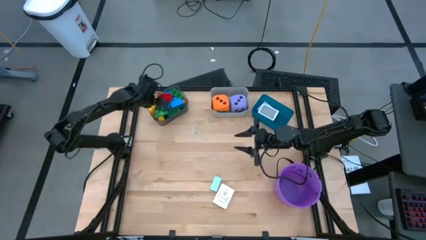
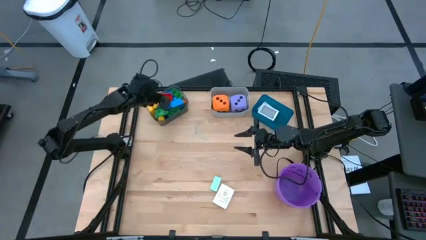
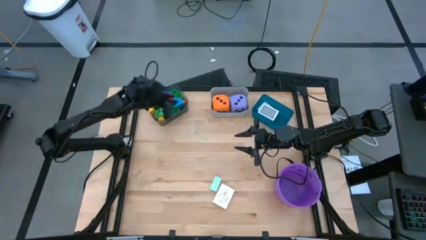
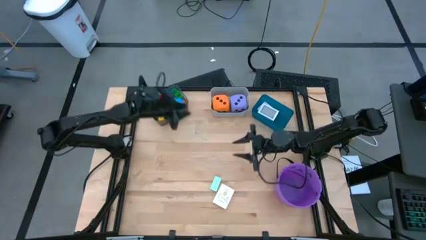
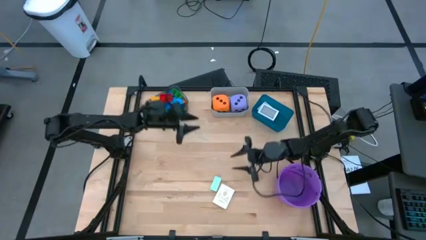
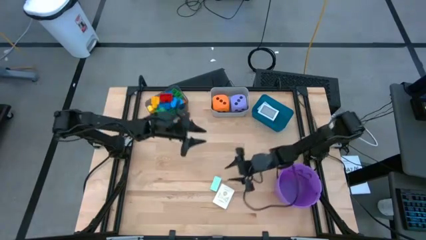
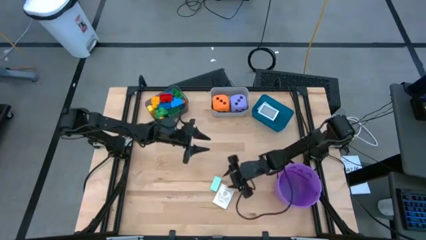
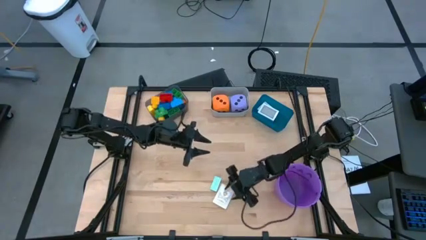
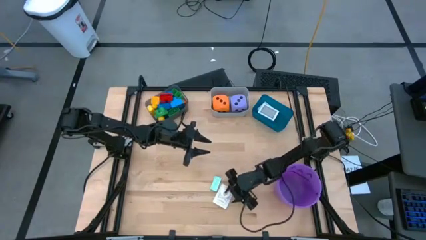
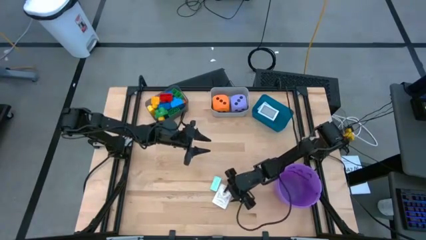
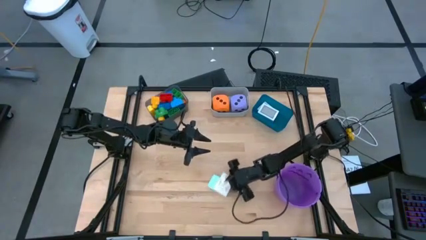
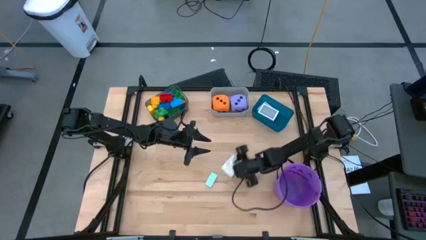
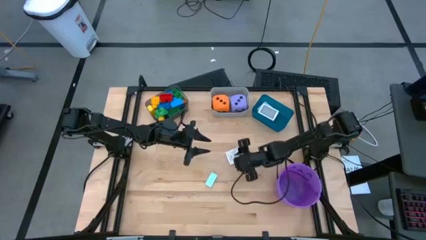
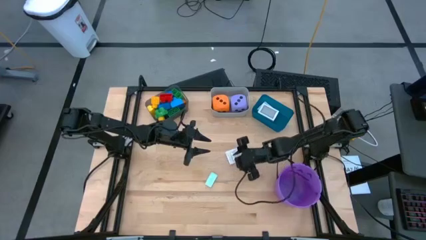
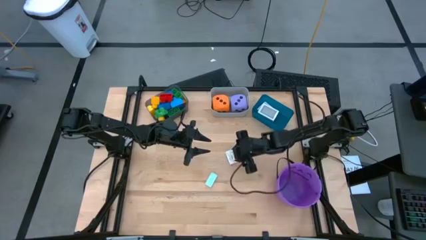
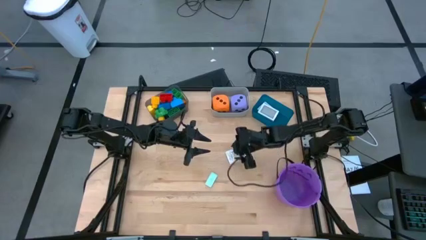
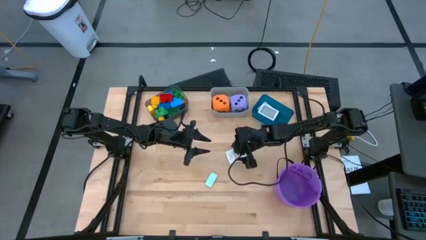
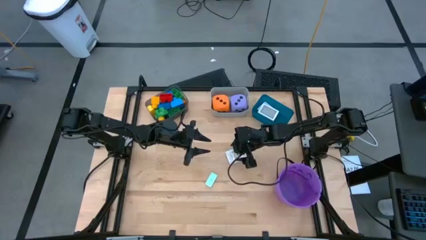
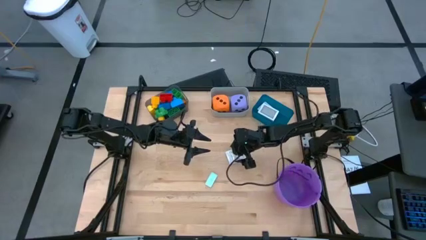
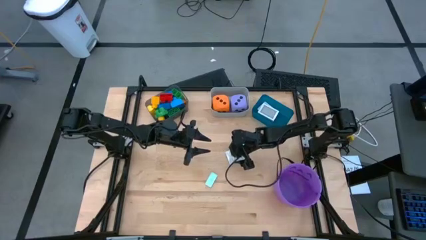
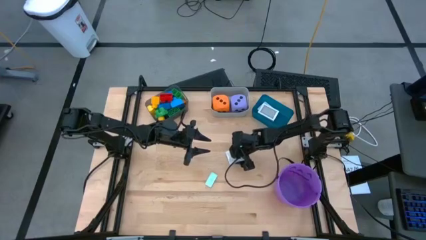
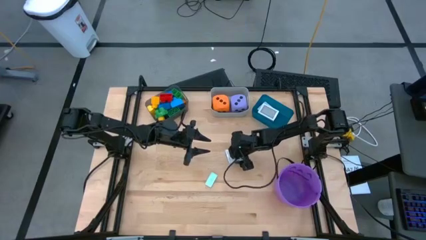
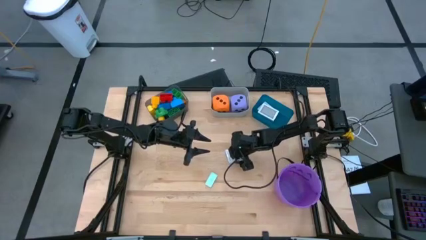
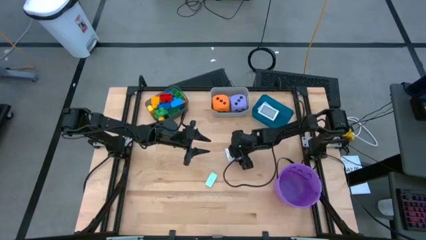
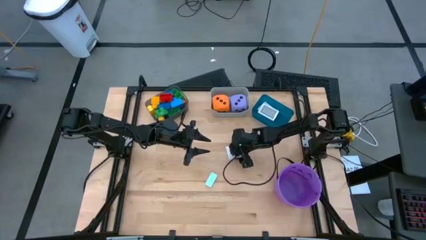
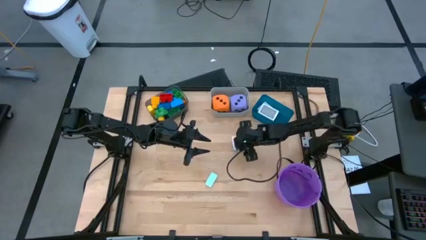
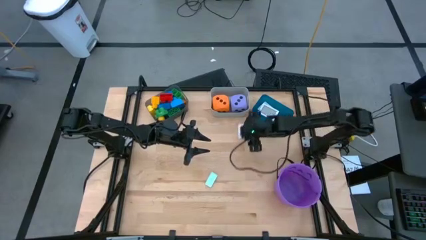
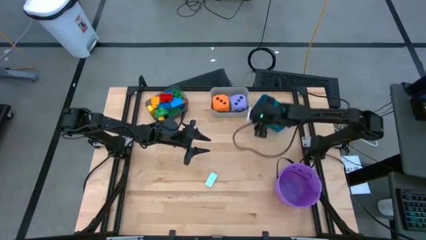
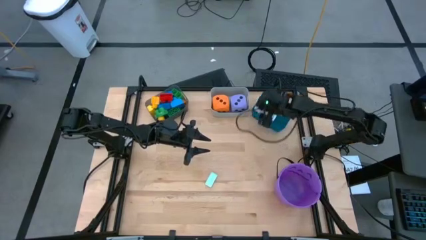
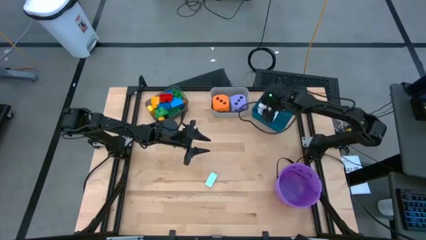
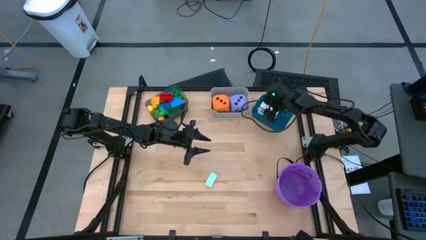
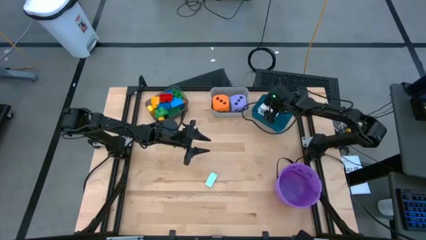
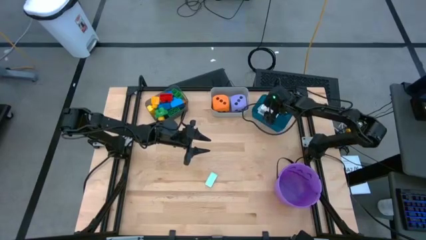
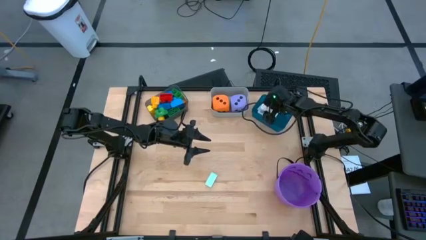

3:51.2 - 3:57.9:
Task: Pick & Place Toys
Put the yellow deck of cards into the blue bin

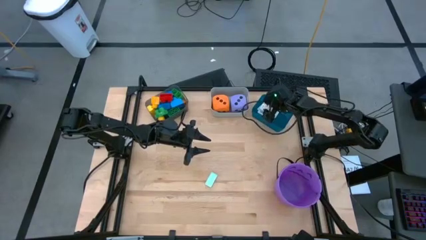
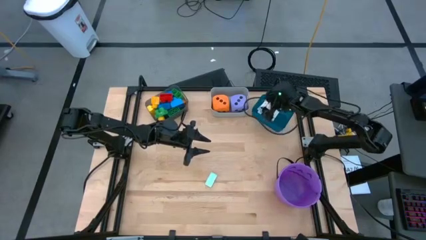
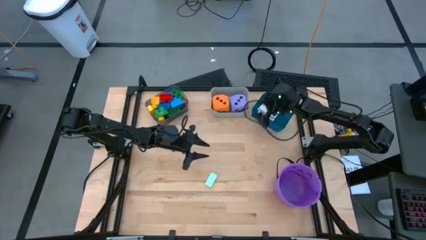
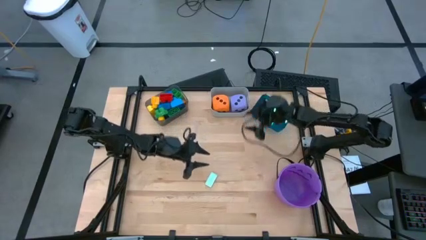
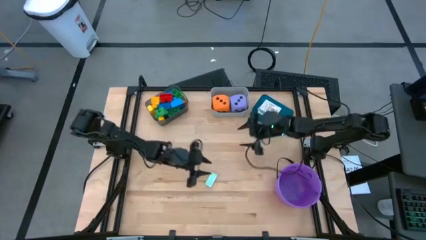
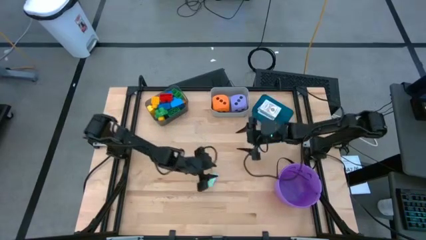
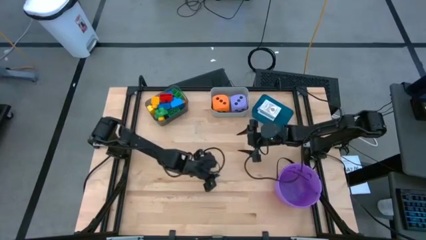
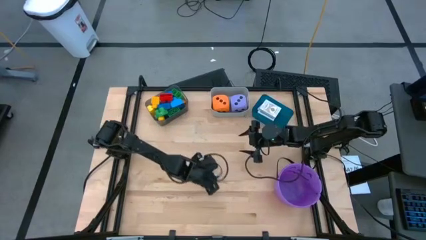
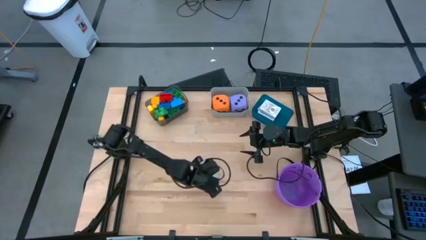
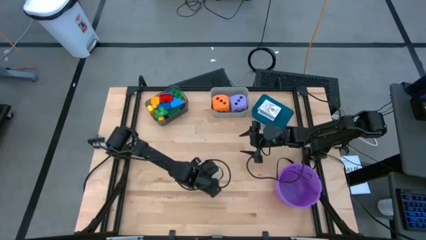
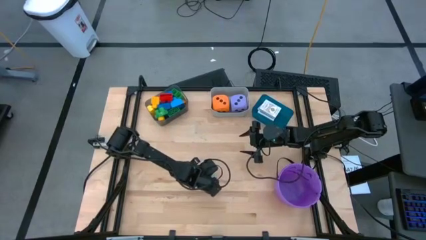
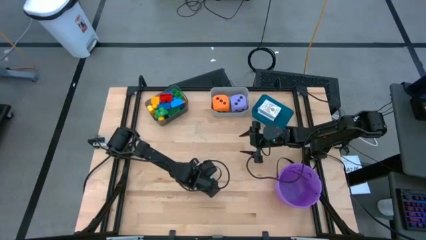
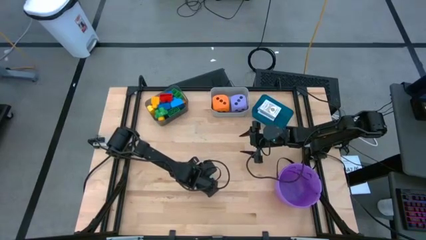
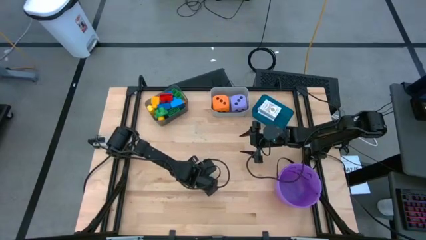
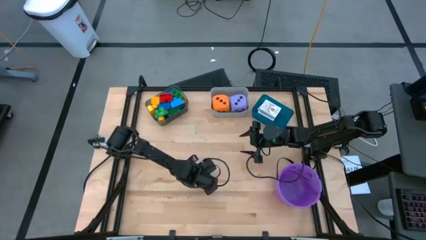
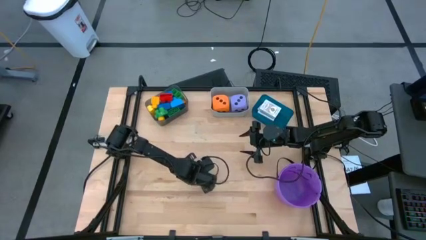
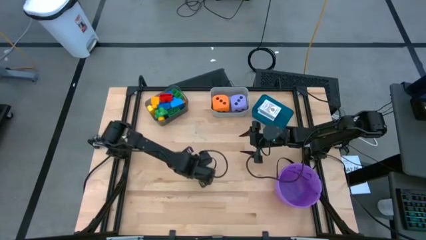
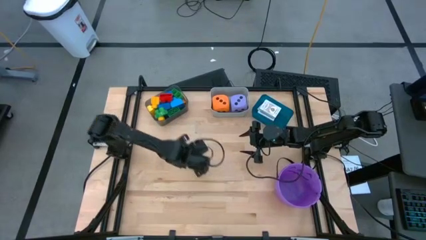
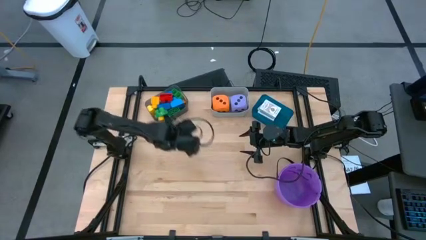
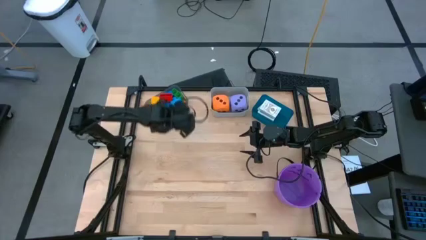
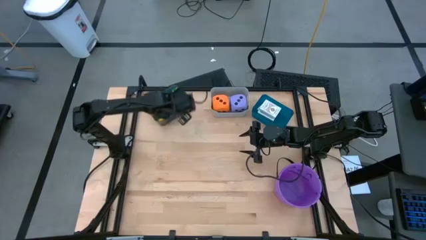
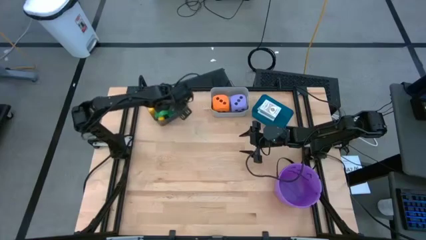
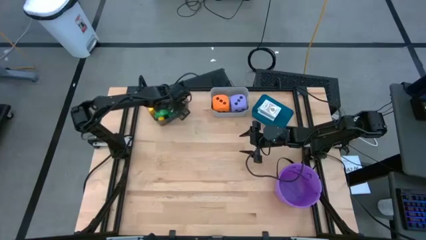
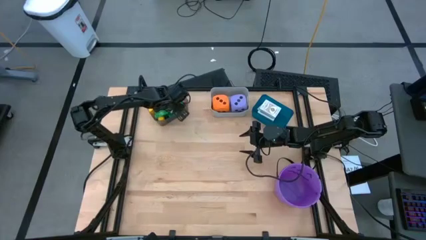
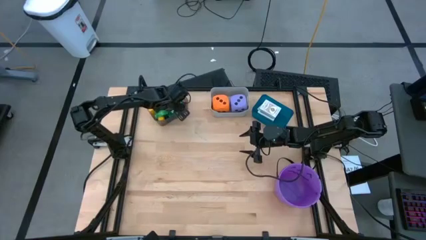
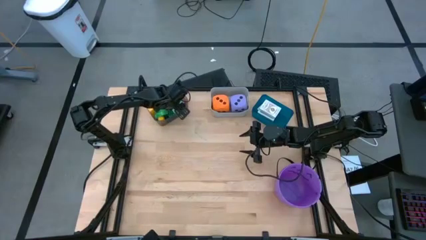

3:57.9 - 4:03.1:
Put the light blue gamepiece into the black bin
